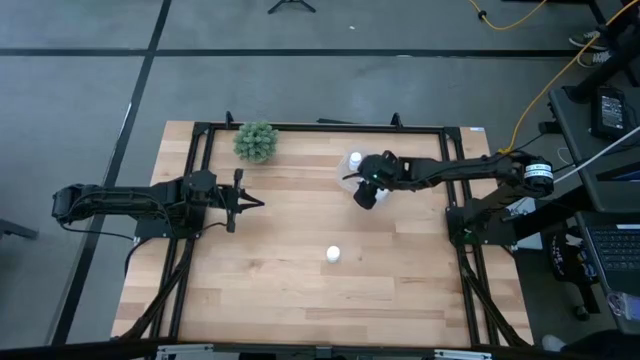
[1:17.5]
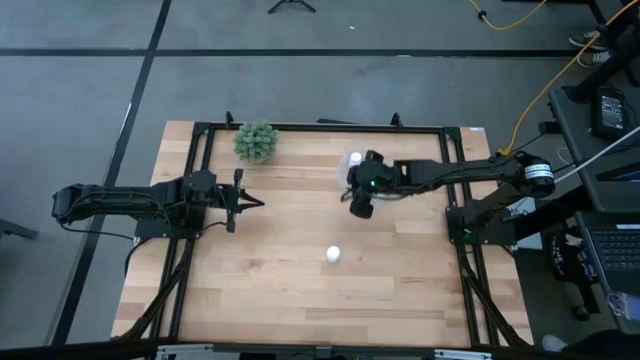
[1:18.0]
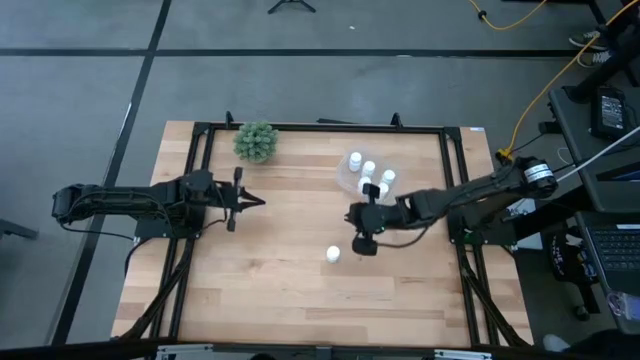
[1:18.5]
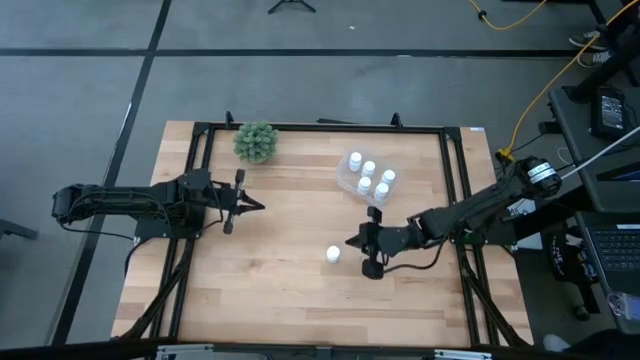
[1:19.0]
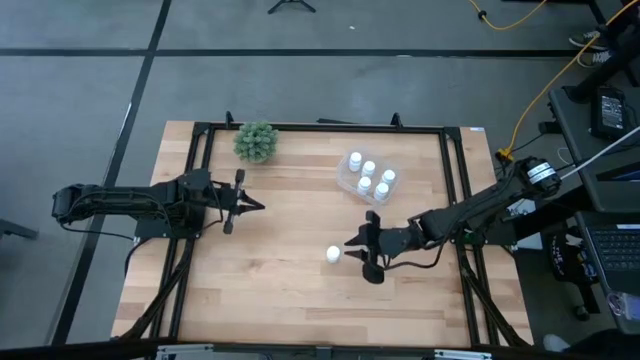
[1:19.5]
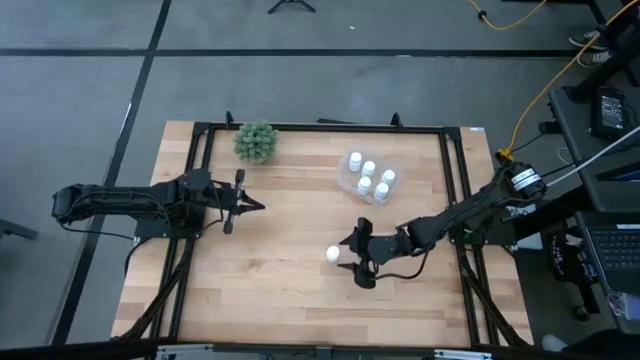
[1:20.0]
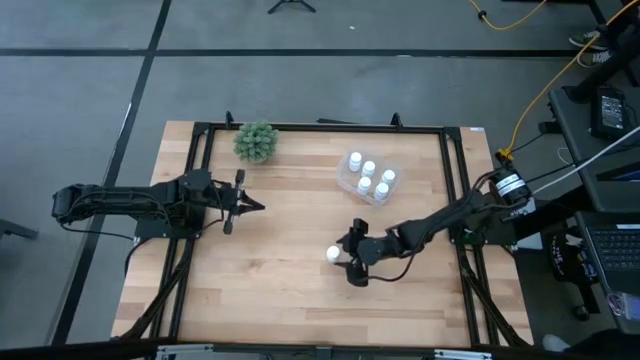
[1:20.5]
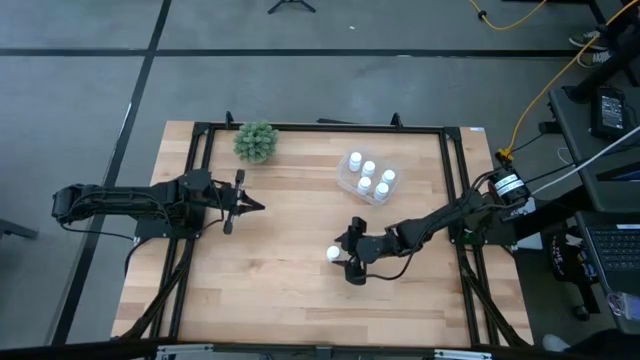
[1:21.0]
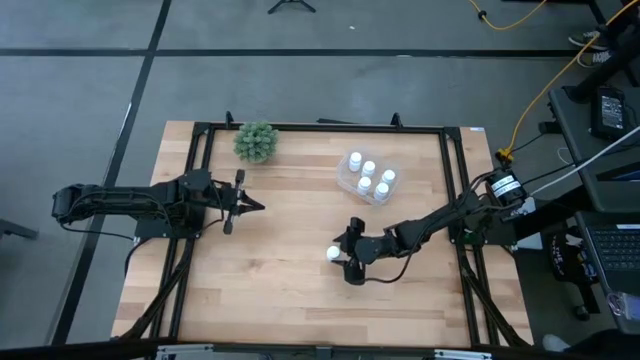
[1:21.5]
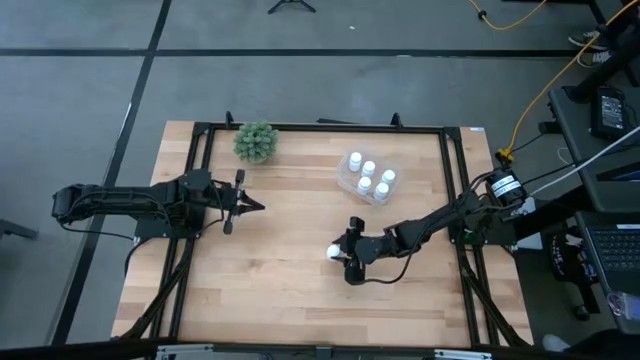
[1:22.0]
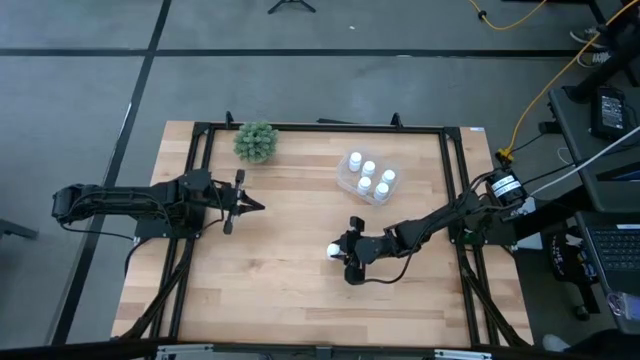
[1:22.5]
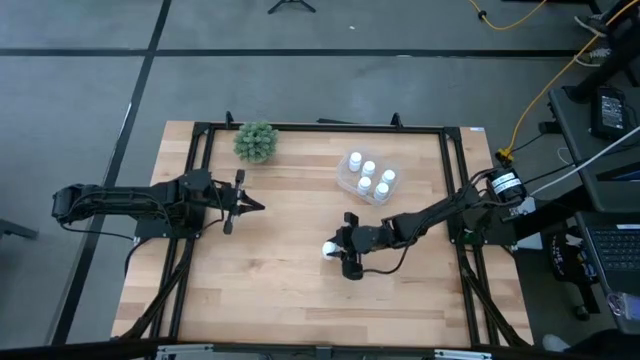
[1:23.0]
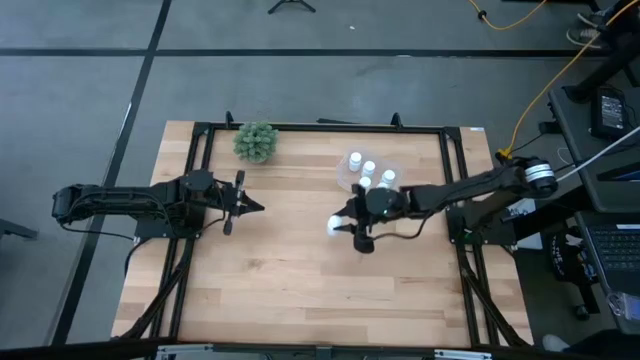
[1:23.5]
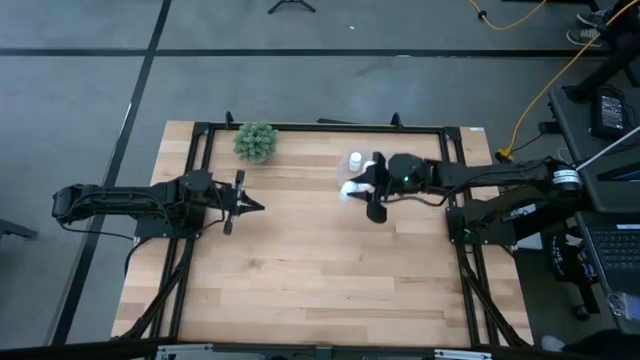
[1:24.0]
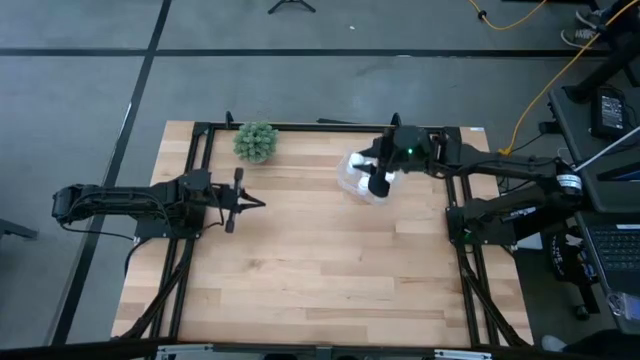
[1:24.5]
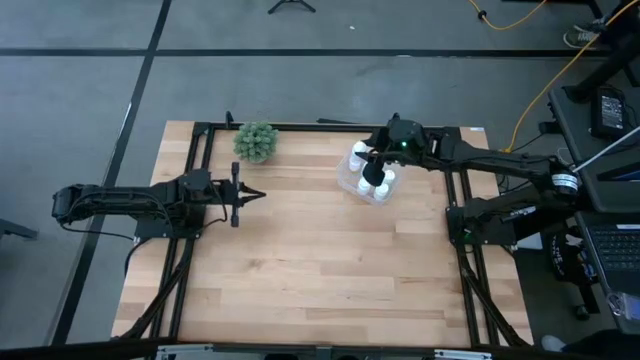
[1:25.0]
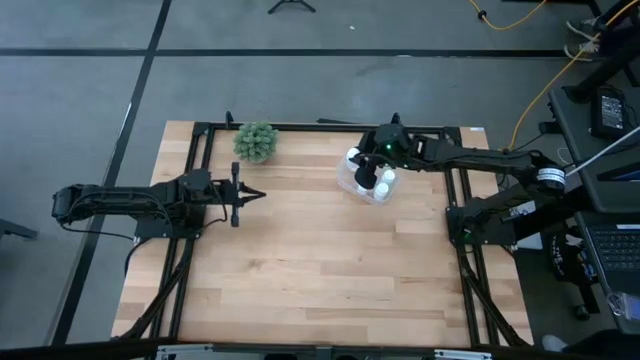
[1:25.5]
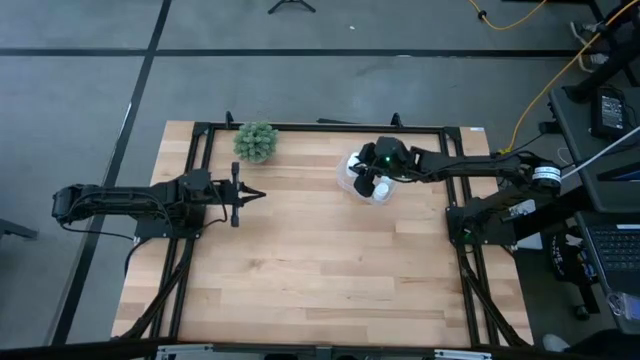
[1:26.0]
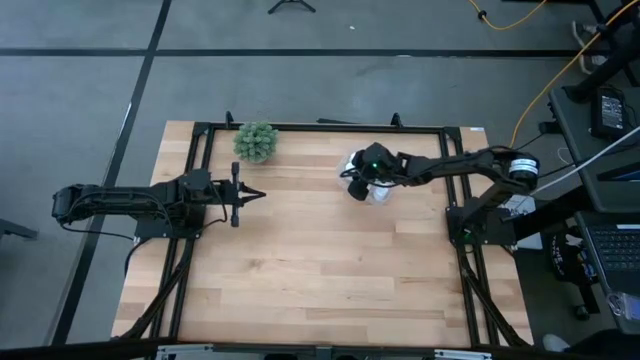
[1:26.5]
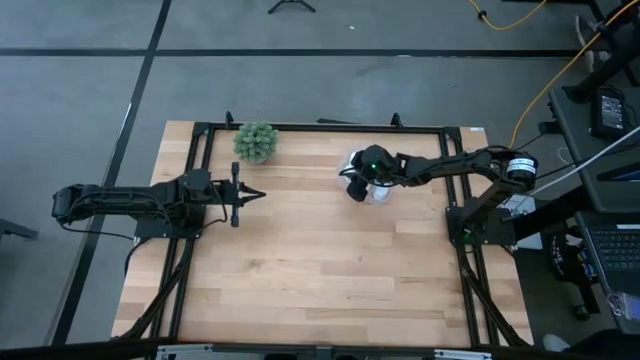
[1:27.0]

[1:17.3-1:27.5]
Task: Pick and place pill bottles into a basket
Put the white pill bottle into the transparent bin

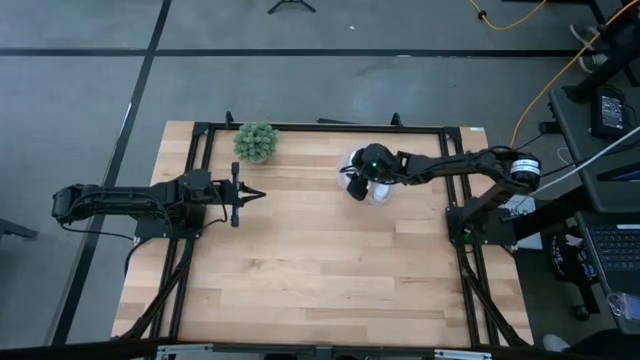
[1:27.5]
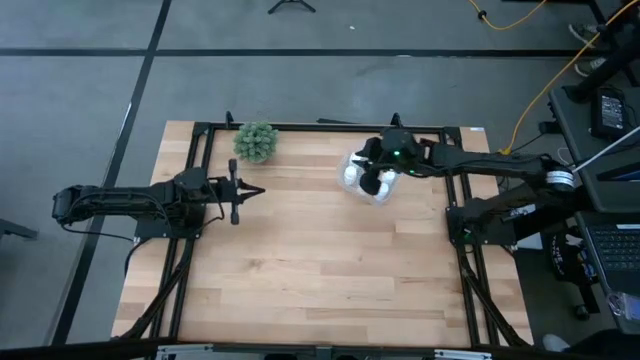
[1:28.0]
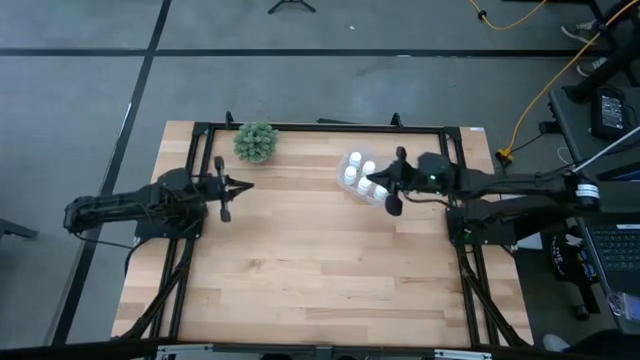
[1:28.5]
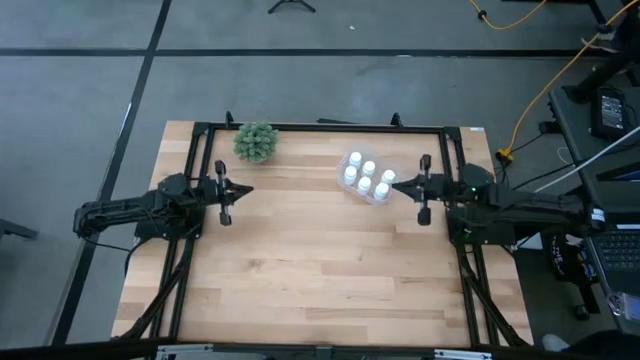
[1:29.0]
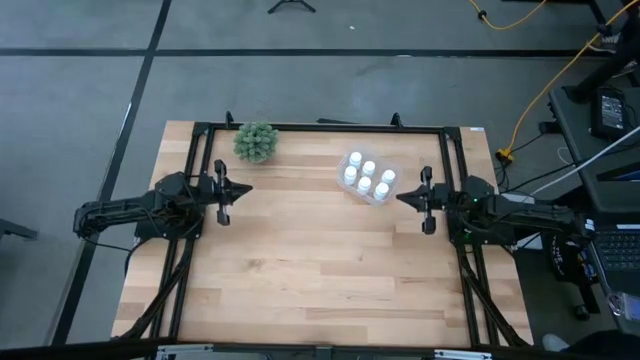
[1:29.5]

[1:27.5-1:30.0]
Return to Home Position

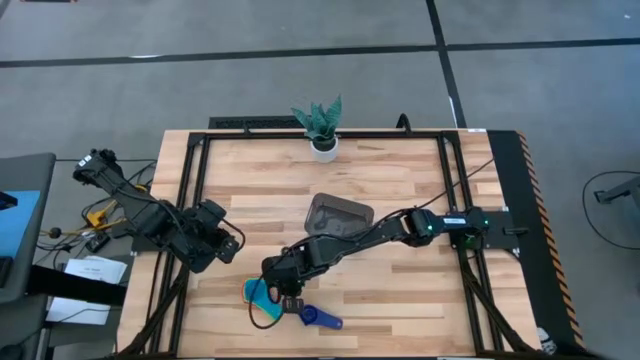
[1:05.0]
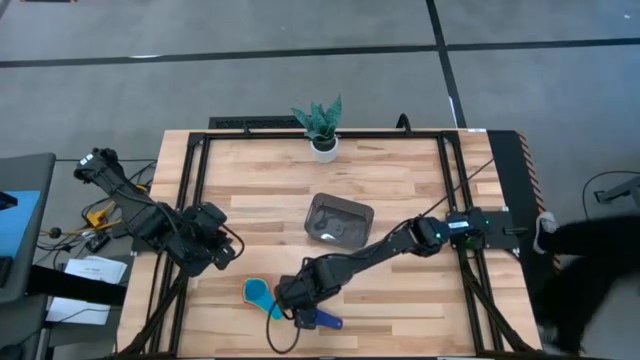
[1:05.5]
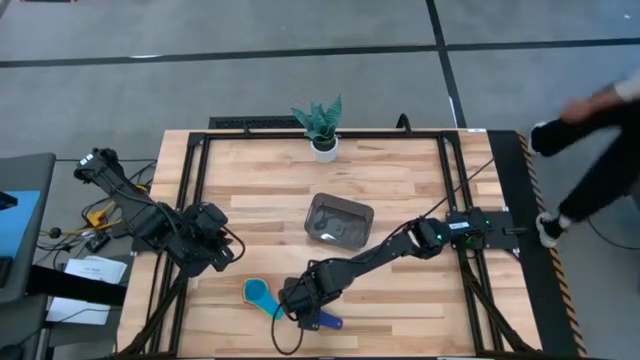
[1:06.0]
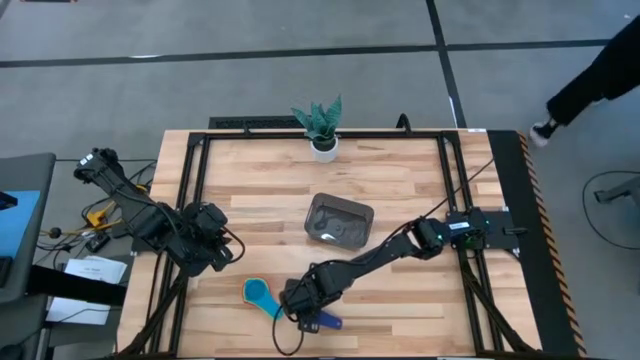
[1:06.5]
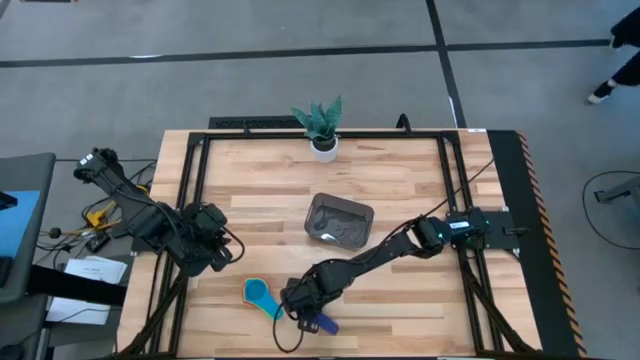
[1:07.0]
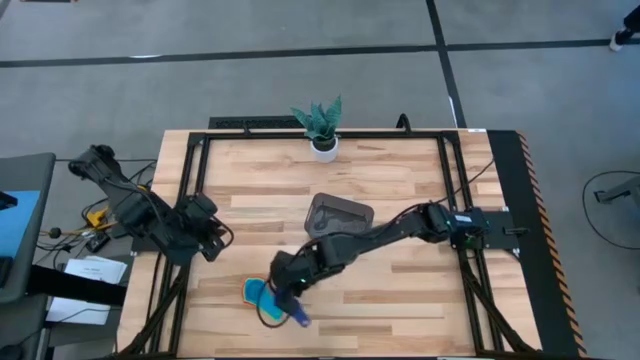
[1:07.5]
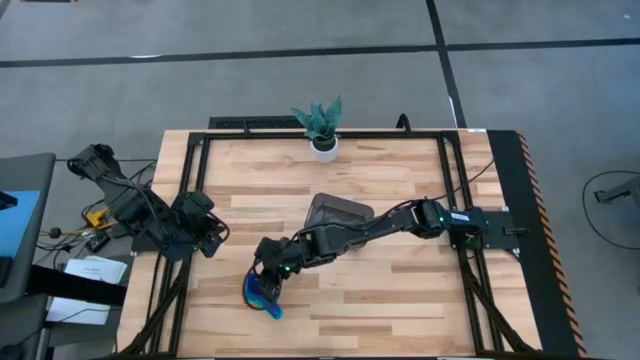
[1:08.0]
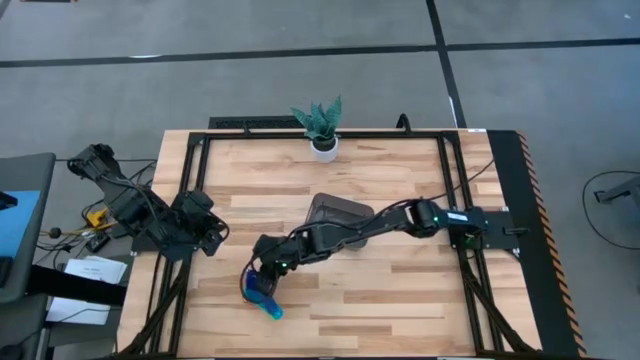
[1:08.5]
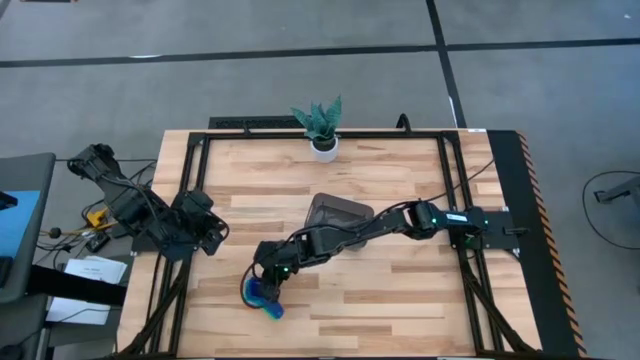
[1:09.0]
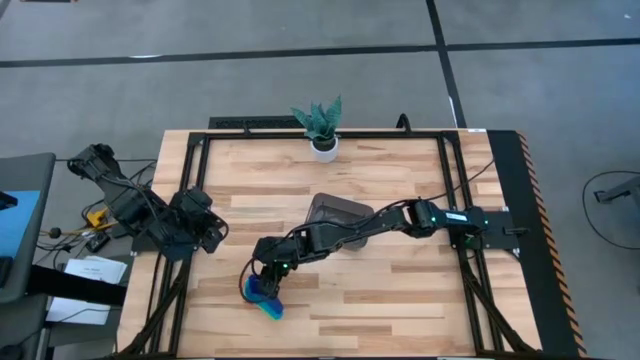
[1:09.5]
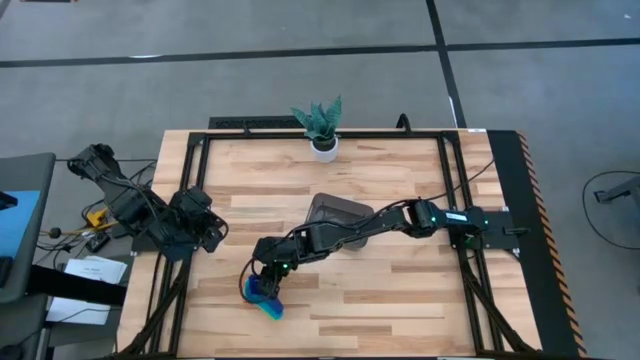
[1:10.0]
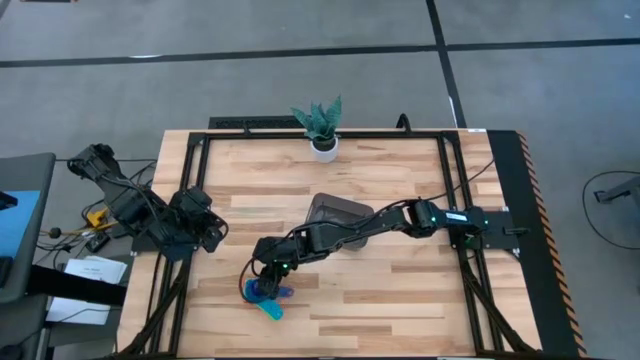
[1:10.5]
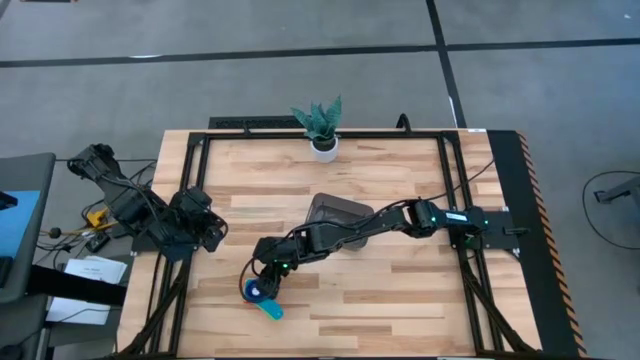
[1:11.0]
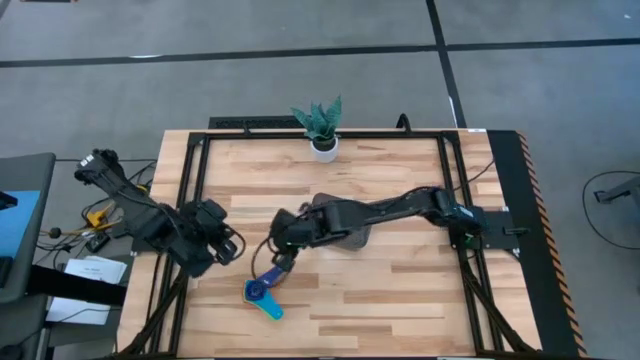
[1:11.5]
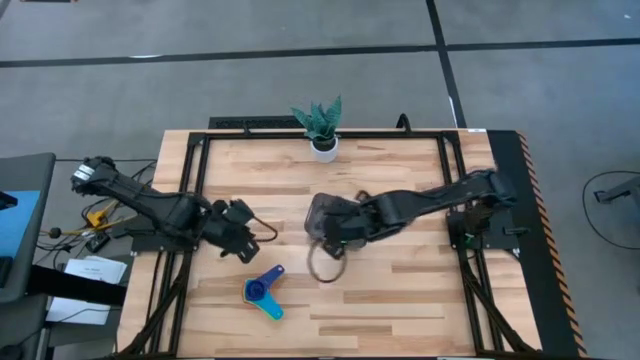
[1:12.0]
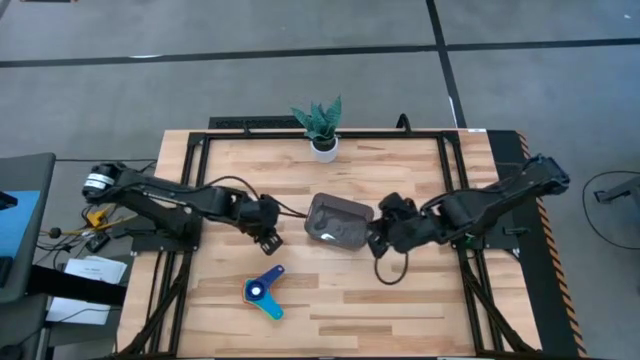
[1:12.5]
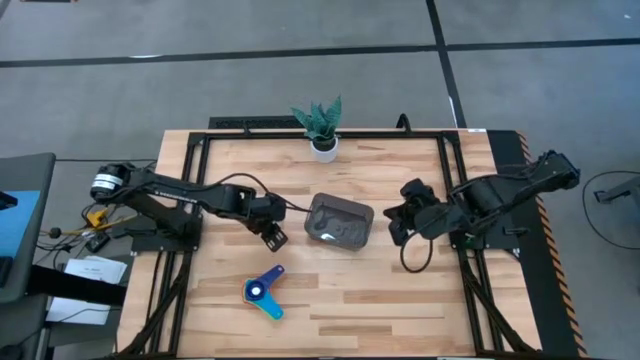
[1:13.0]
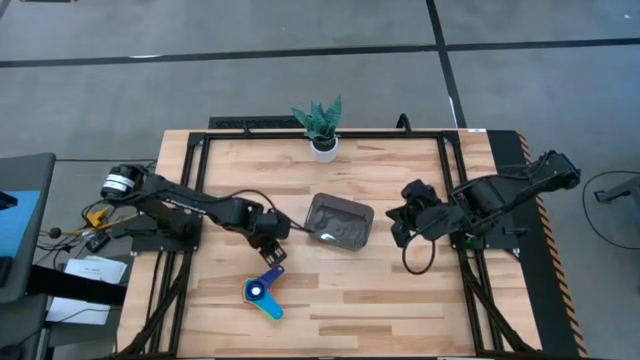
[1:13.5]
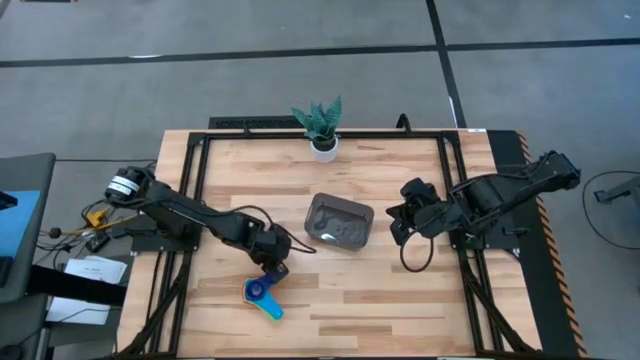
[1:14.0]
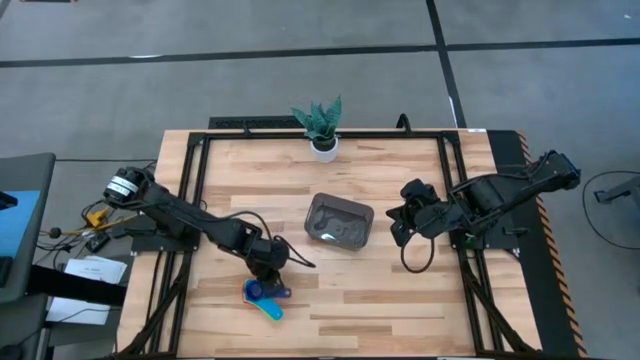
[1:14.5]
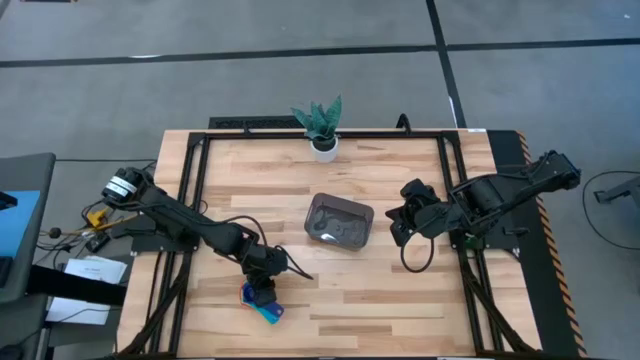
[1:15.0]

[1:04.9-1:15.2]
Task: Nest measuring cups in basket
Stack the dark blue measuring cup on top of the light blue measuring cup
